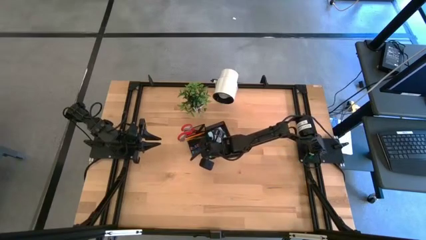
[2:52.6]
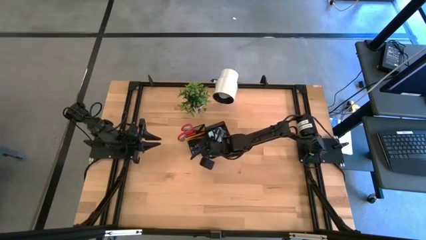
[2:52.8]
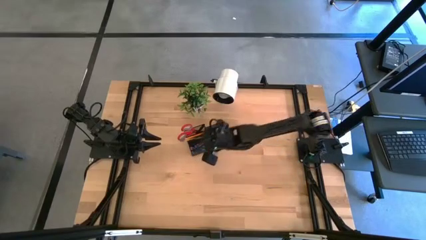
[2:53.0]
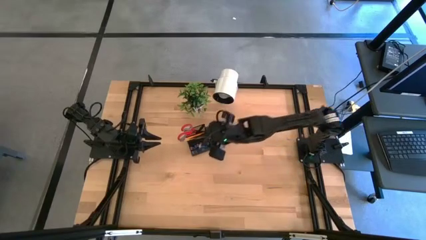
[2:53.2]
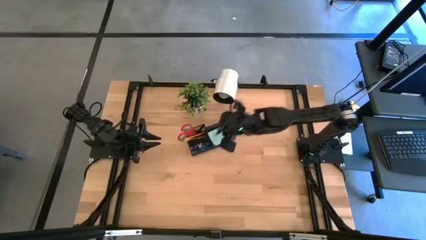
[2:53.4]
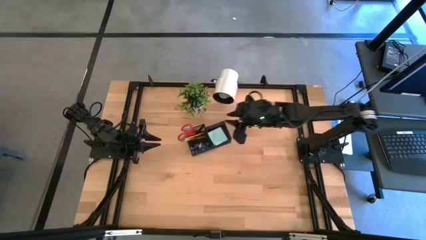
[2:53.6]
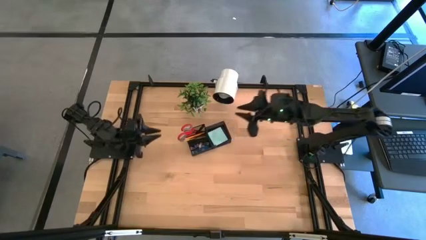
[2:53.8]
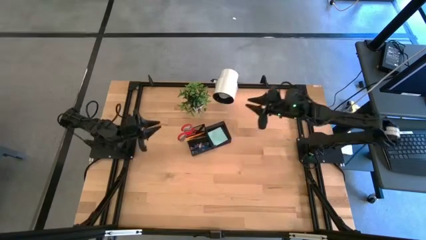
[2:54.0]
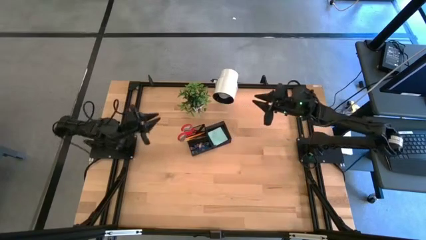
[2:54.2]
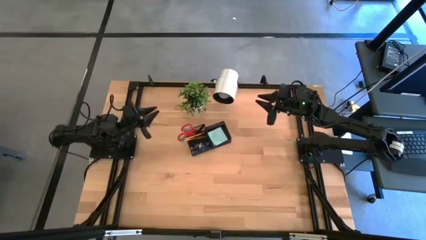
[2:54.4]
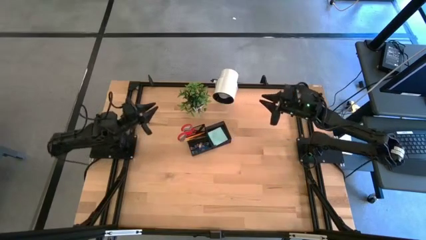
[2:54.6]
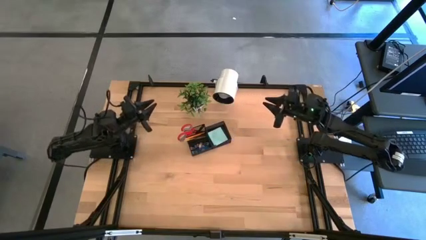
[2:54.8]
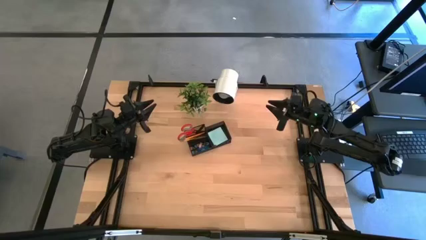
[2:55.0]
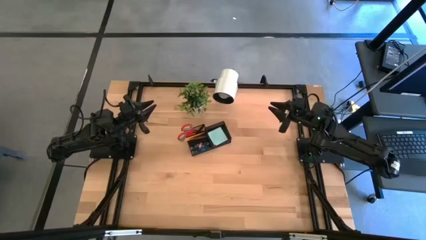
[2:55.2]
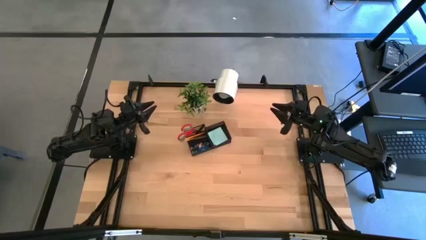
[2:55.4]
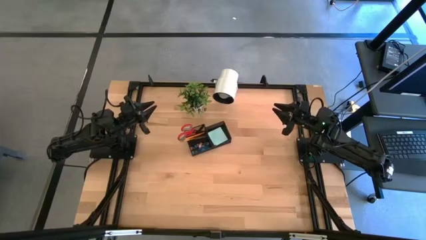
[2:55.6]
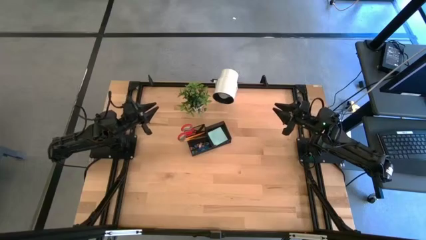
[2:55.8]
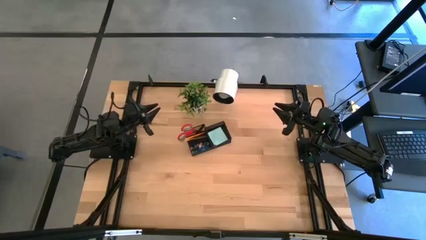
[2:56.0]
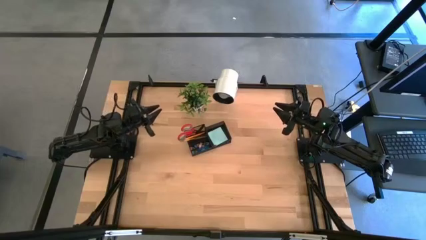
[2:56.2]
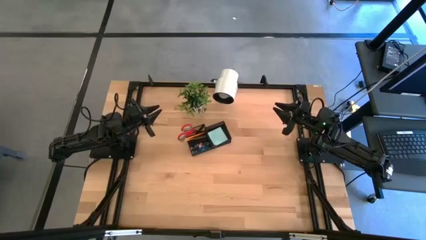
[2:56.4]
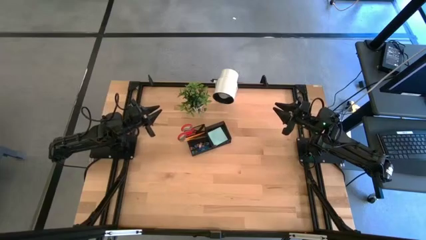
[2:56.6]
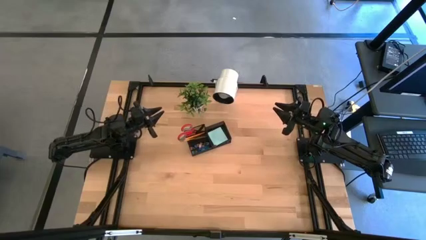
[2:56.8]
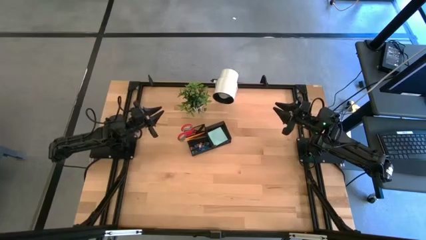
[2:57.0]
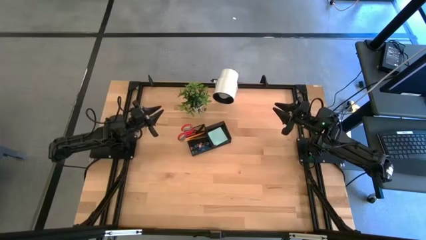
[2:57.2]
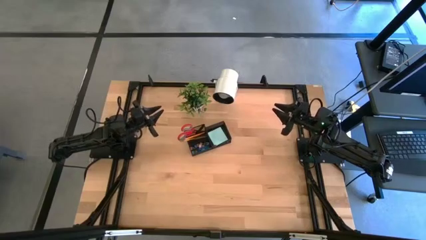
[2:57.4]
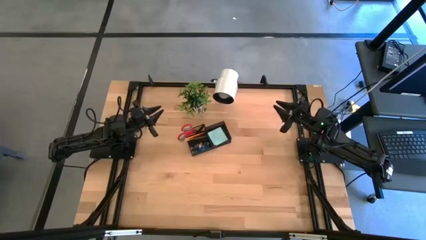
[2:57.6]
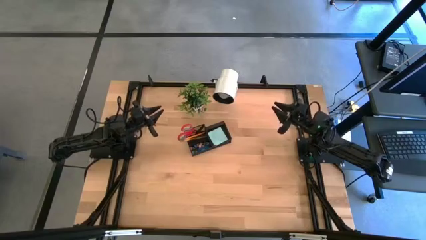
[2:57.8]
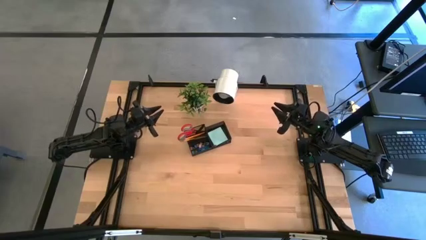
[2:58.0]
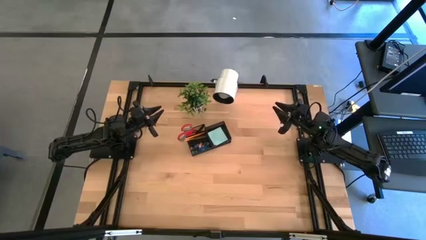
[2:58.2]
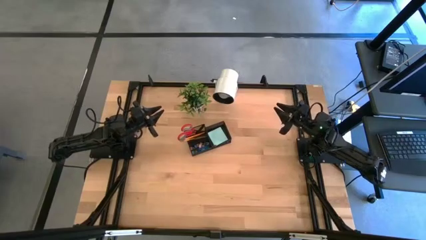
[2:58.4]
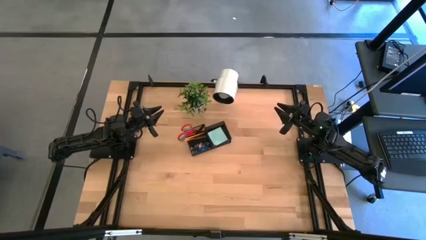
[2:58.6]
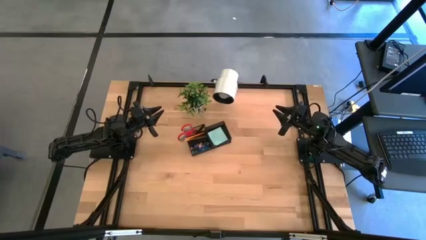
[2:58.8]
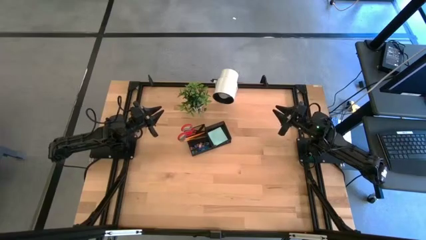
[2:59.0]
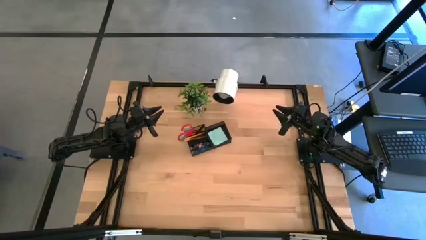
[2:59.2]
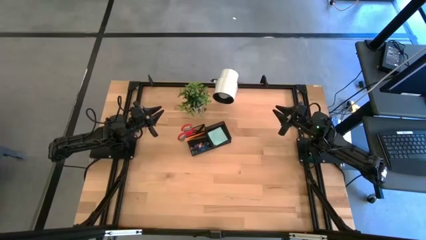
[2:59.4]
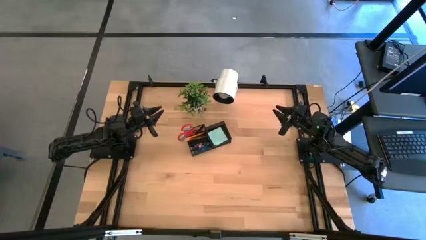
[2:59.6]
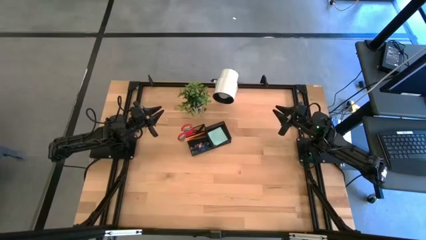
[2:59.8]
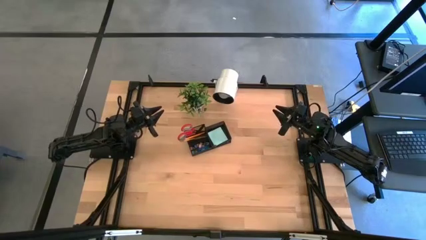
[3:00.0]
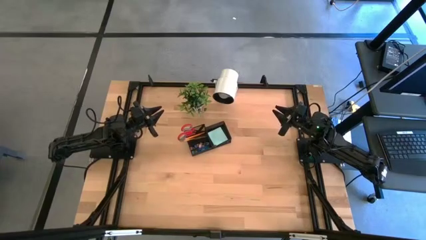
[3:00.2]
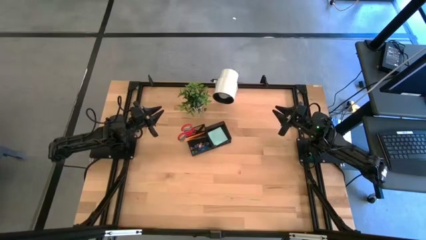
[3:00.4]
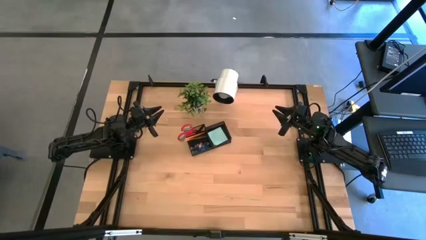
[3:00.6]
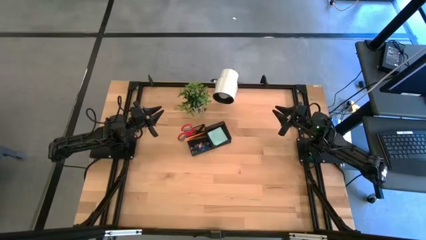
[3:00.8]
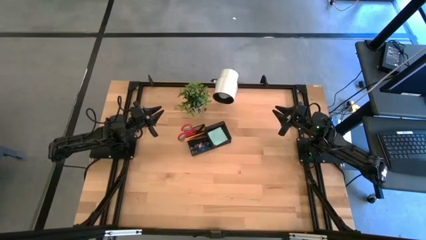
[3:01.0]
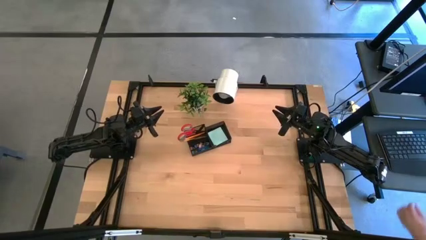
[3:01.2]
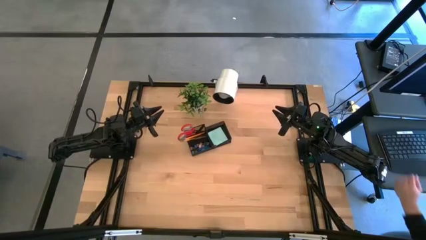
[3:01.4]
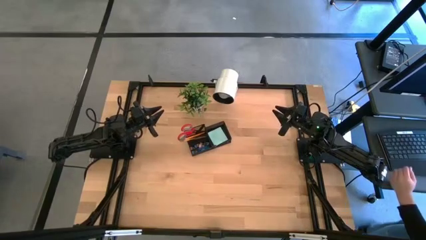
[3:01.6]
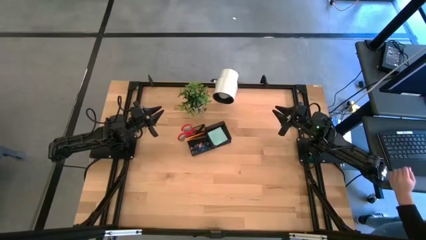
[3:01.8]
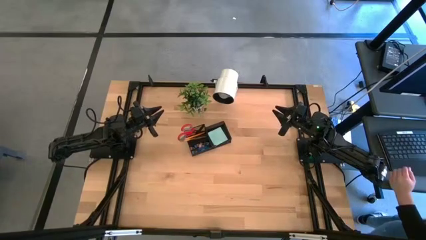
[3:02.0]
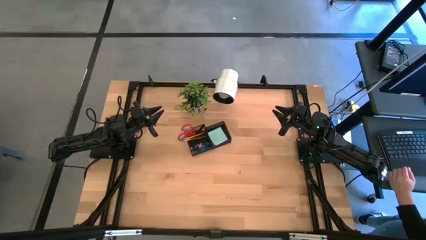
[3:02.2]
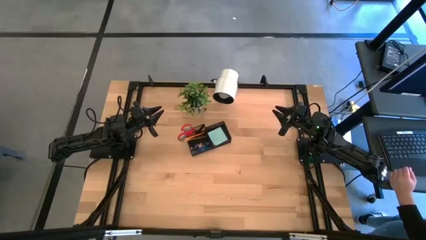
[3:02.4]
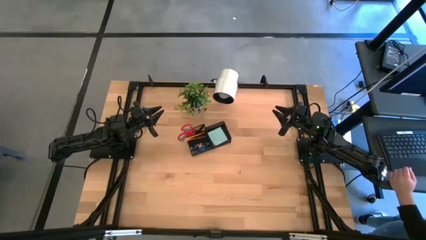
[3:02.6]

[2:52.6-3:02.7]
Task: Pick and place office supplies into organizer
Return to Home Position
